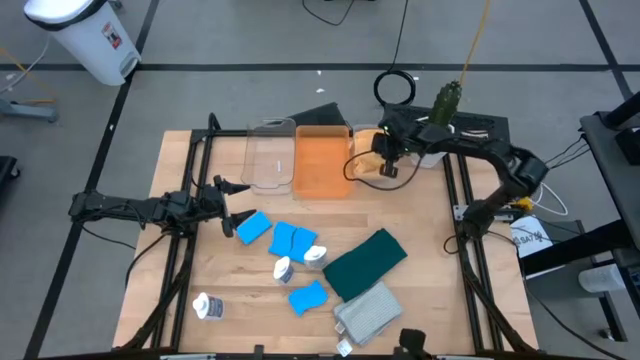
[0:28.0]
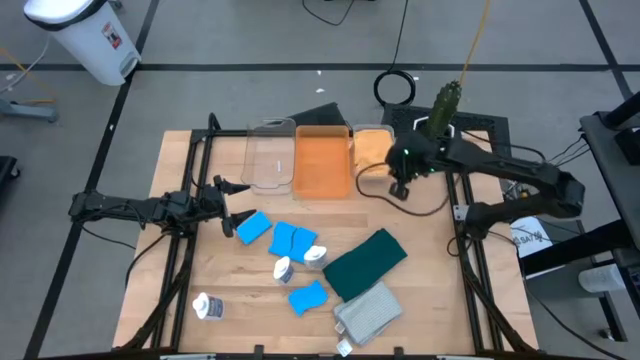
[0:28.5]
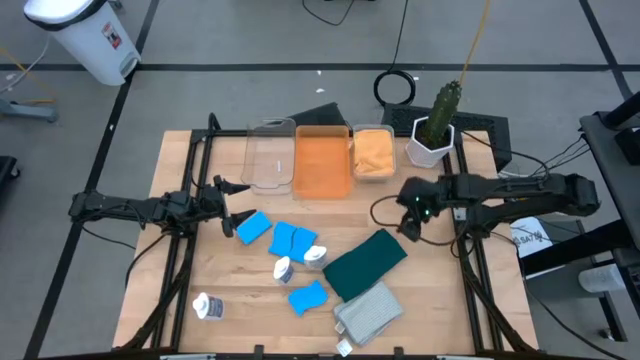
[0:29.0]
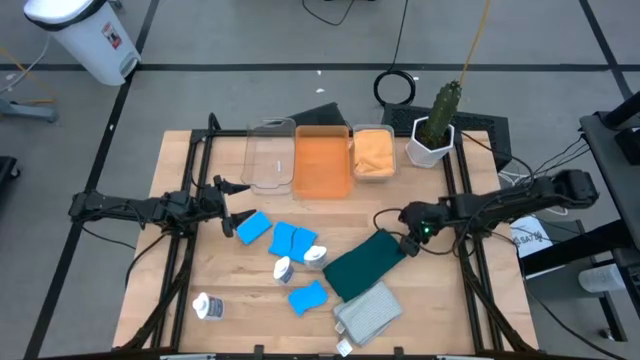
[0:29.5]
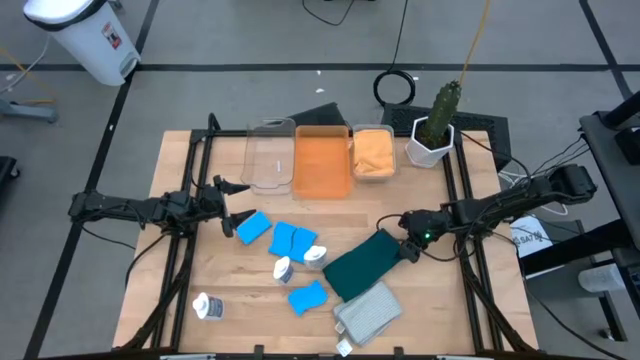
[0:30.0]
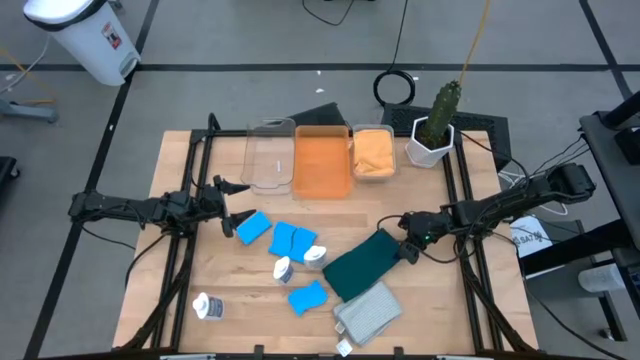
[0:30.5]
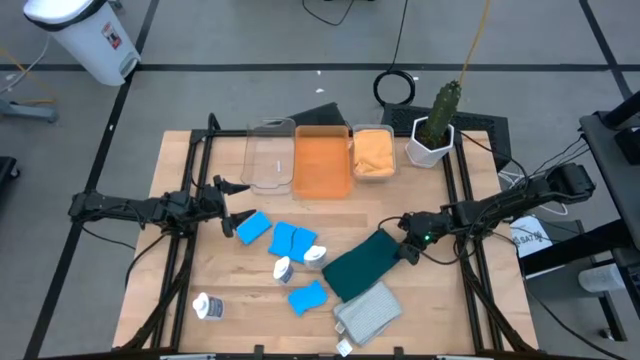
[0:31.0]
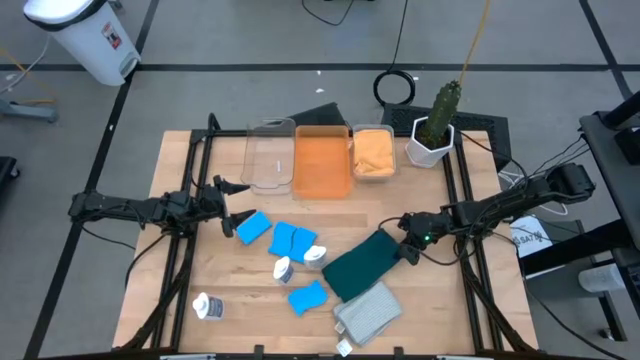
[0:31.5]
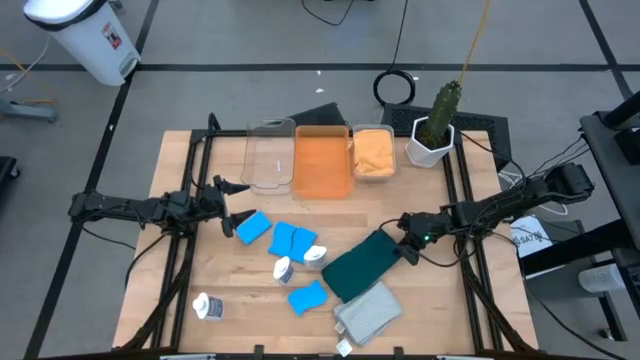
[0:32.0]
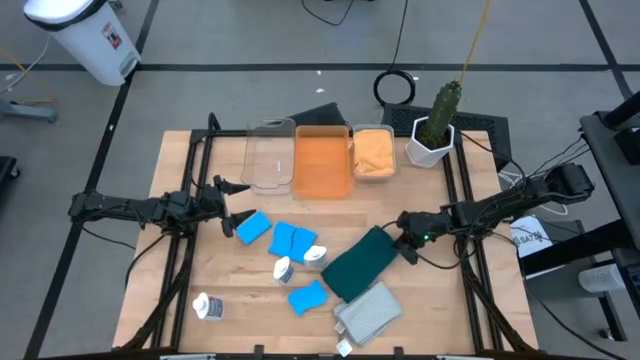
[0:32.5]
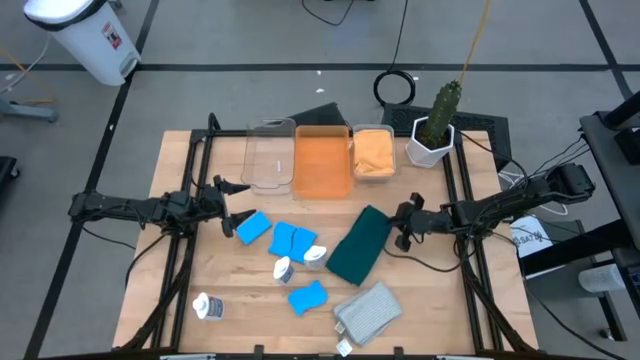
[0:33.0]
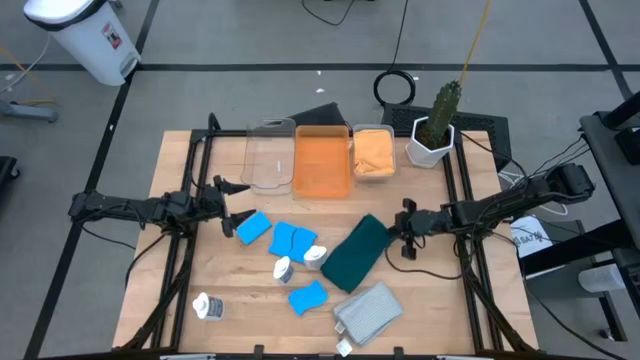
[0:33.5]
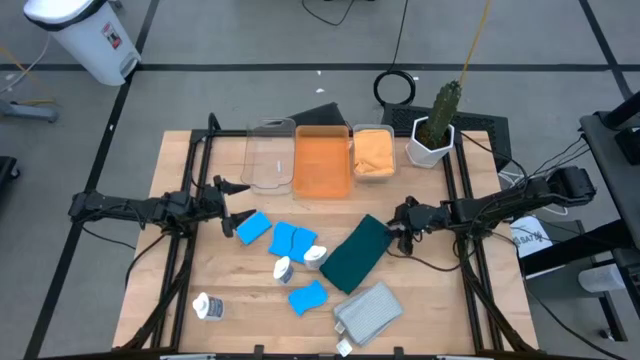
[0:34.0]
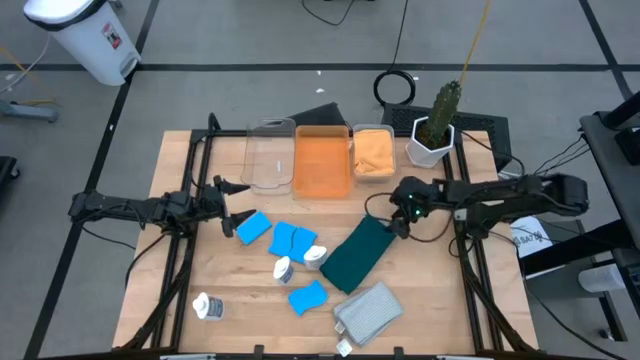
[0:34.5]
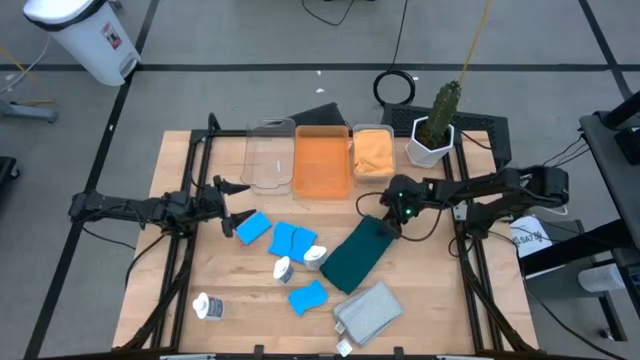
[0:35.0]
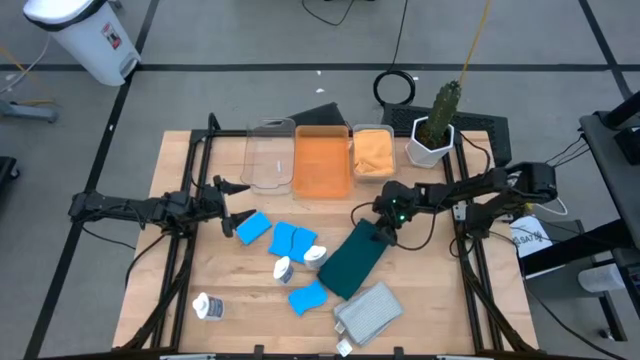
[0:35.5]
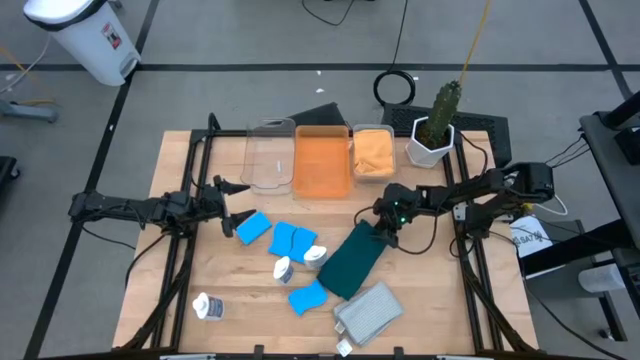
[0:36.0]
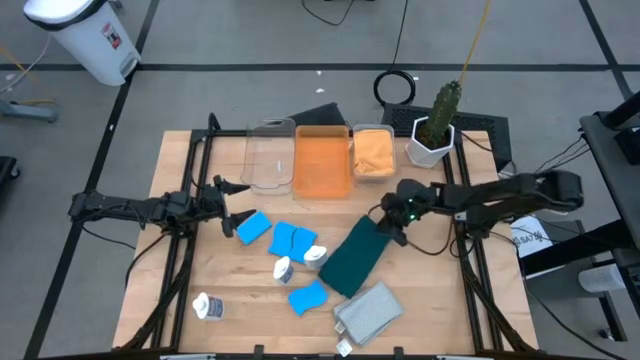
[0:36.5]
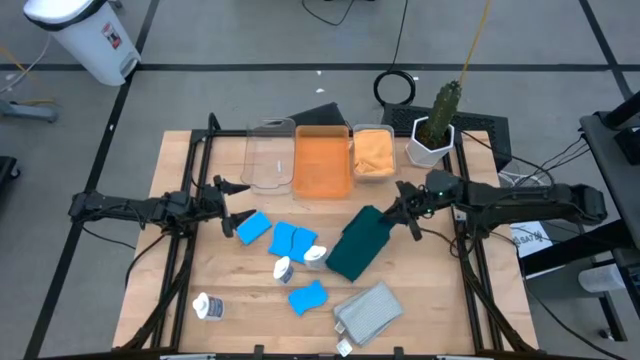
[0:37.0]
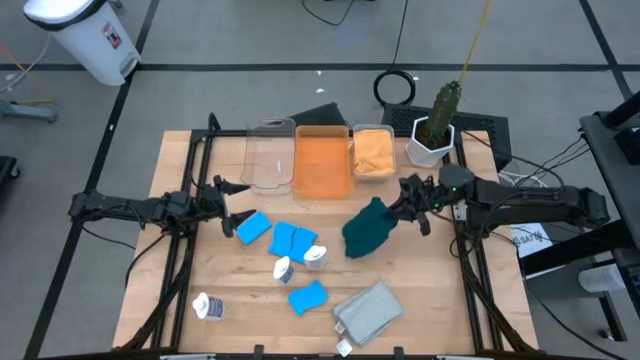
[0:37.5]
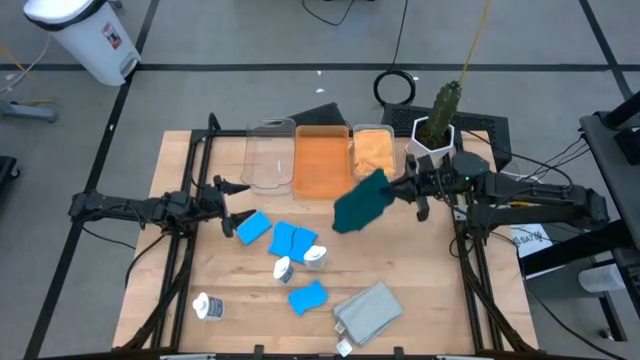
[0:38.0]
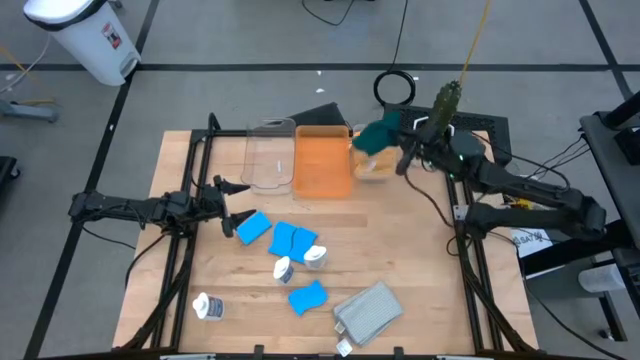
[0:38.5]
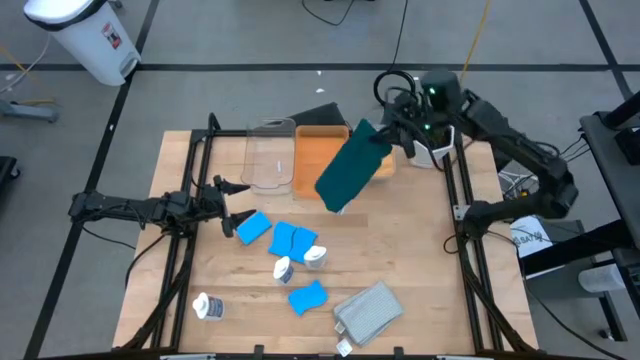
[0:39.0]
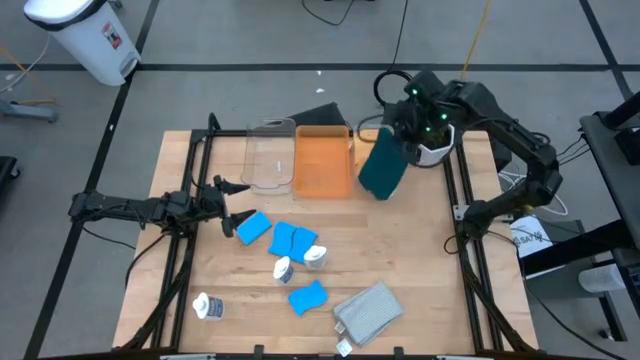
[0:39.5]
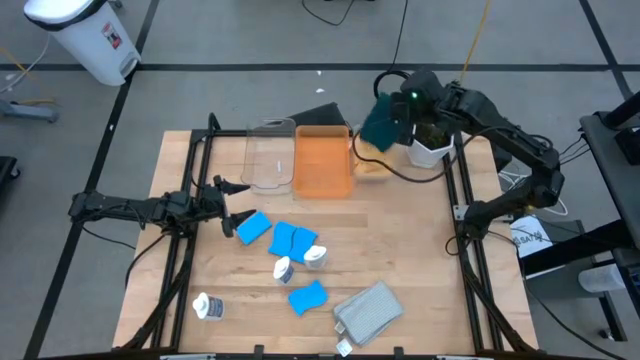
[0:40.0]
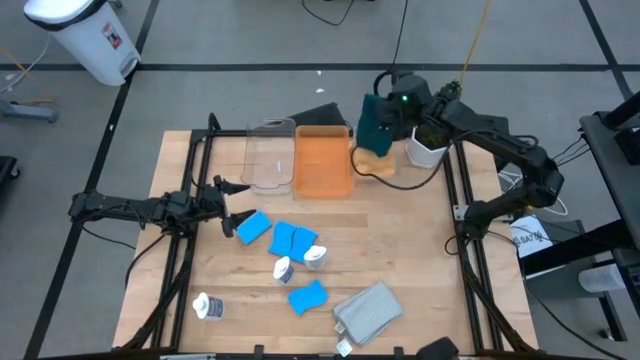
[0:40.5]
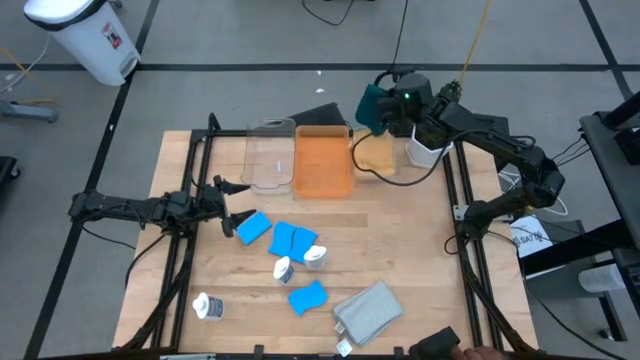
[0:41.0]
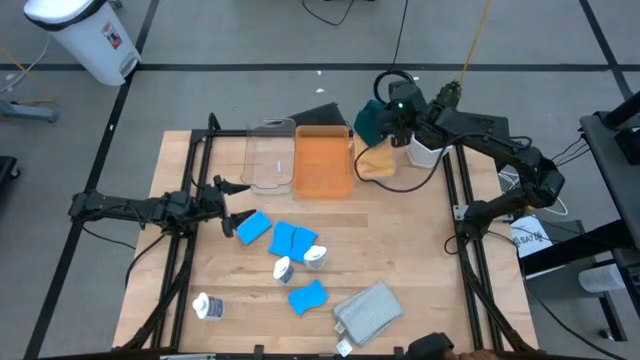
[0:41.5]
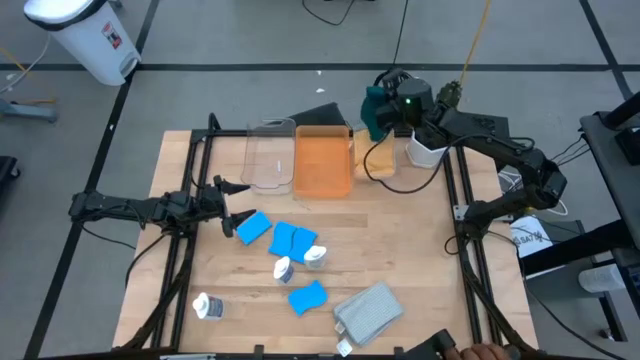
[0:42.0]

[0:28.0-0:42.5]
Task: Pick & Place Kitchen Items
Put the blue microfiber cloth into the white bin

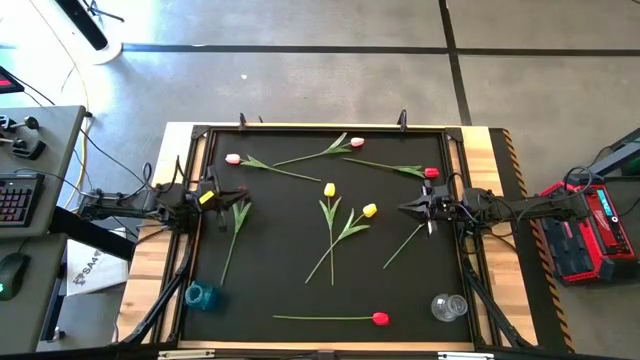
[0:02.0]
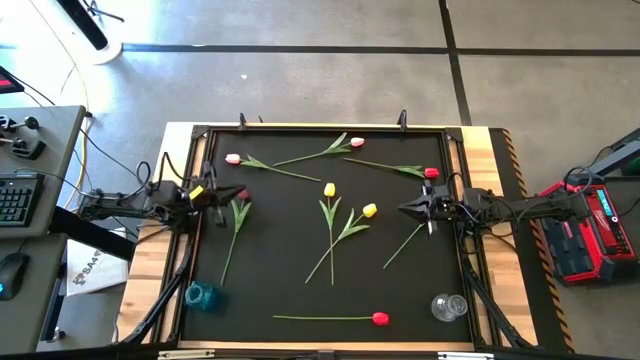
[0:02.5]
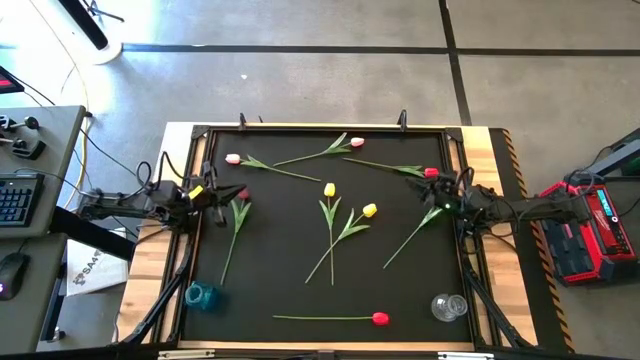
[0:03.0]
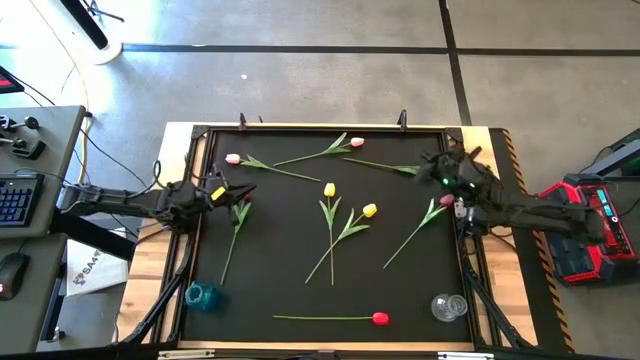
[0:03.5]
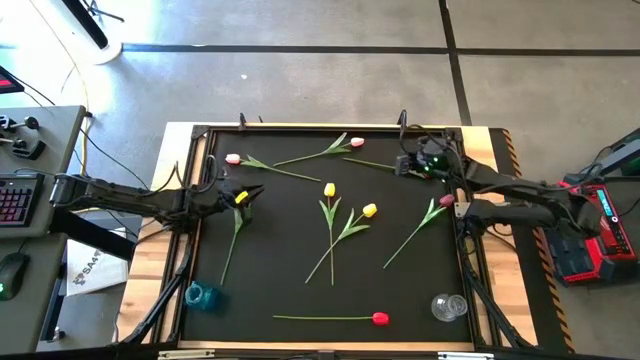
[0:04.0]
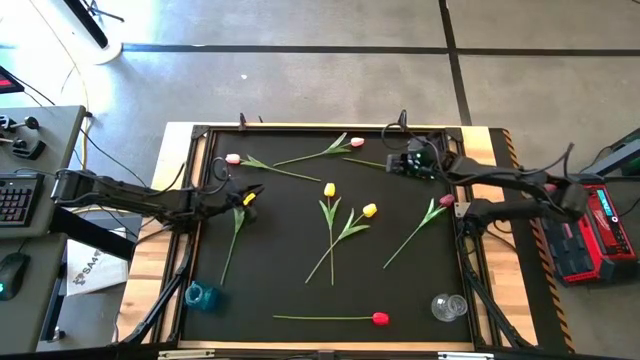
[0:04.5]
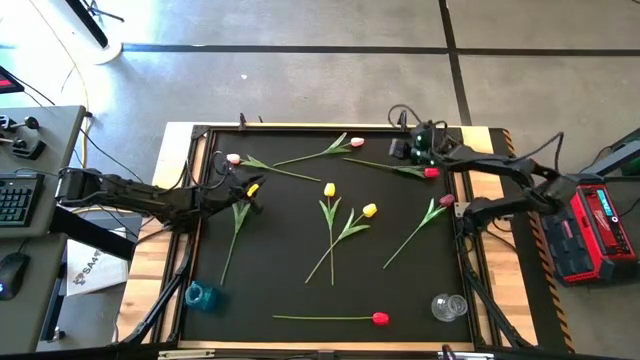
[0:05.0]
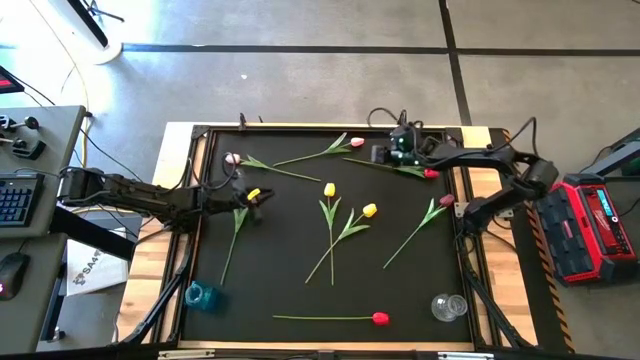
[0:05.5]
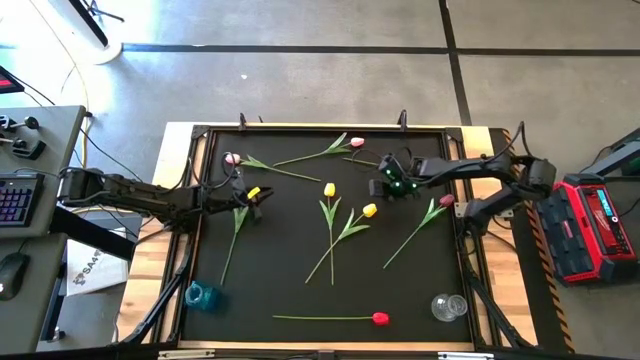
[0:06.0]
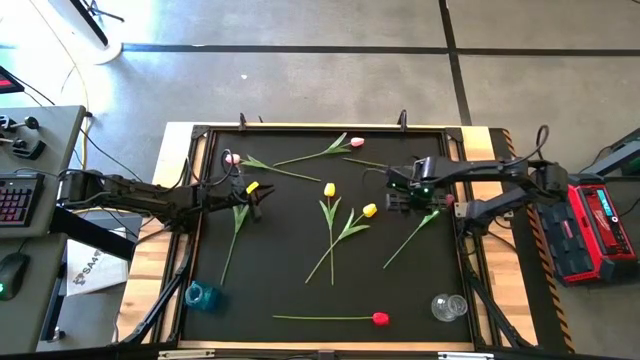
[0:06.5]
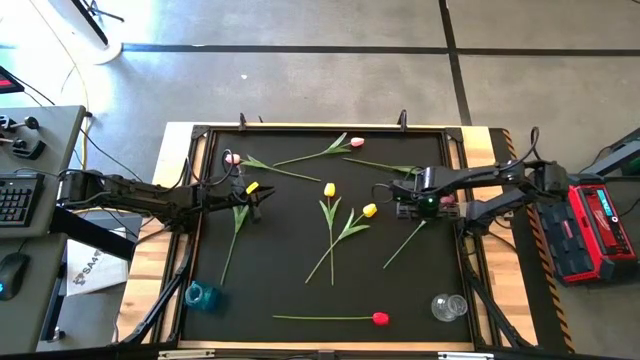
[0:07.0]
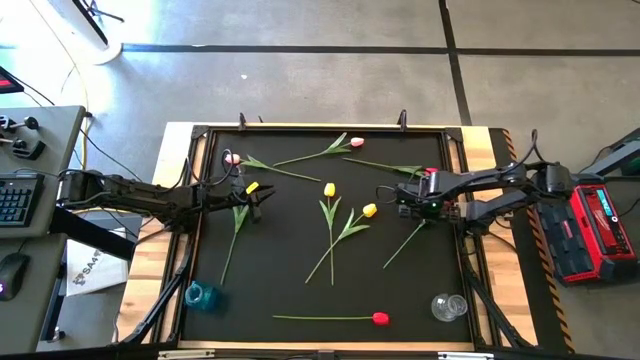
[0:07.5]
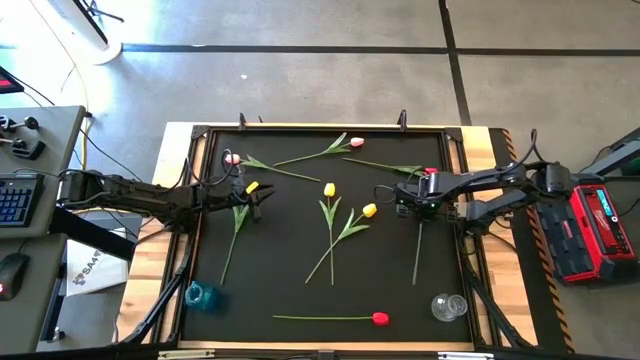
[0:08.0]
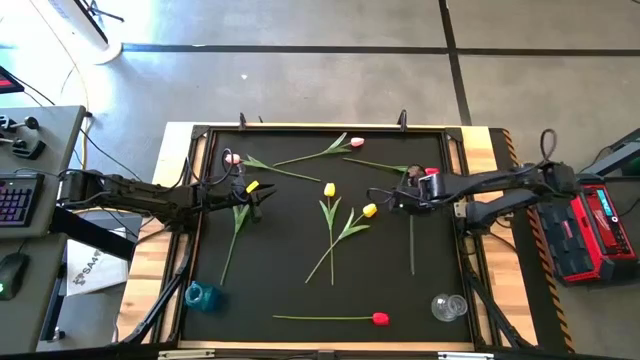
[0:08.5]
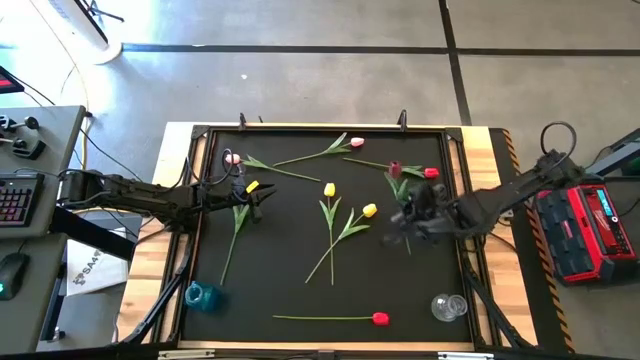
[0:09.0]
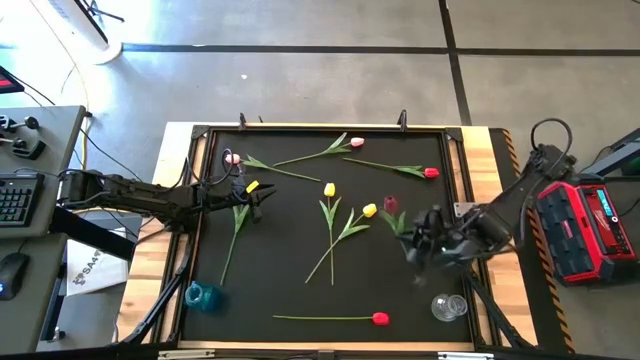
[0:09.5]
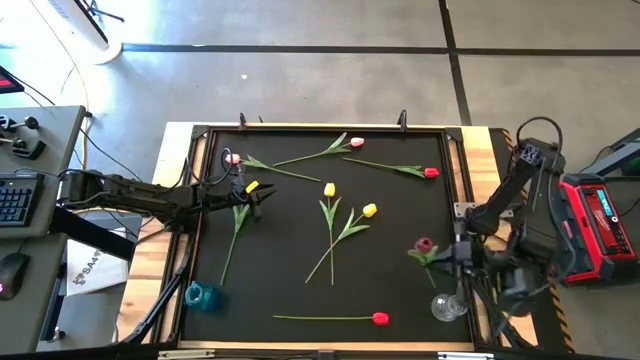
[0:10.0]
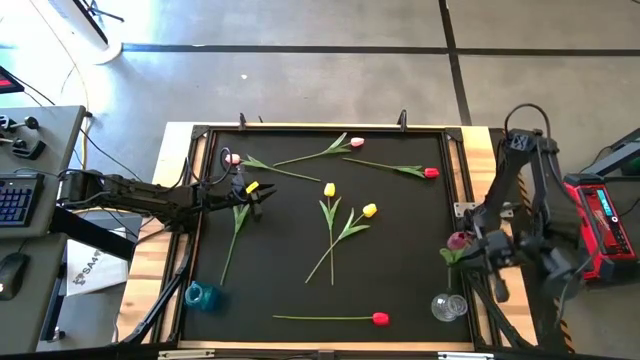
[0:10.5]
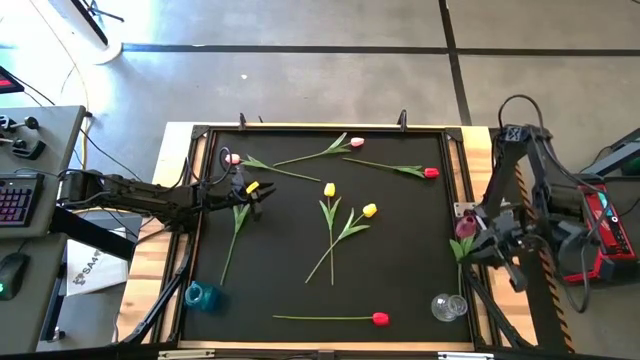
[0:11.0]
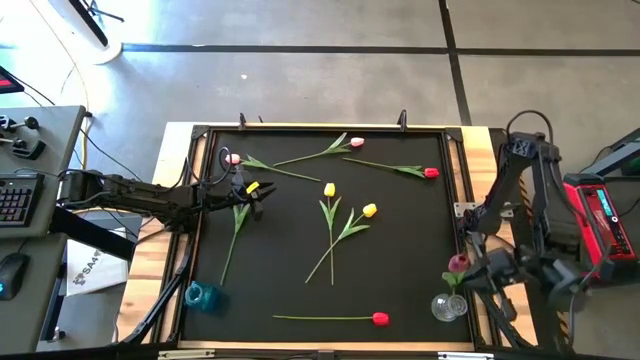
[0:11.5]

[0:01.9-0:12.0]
Task: Sort flowers into vase by color
Put the right dark pink flower into the transparent vase
